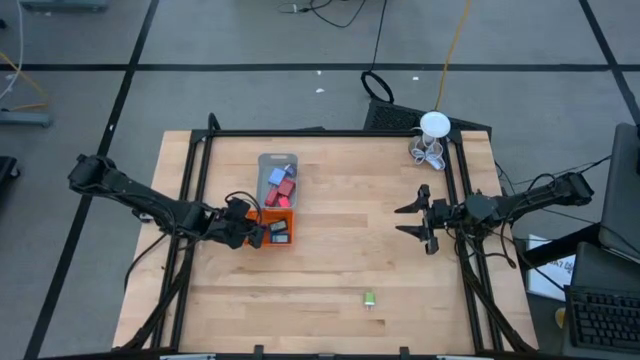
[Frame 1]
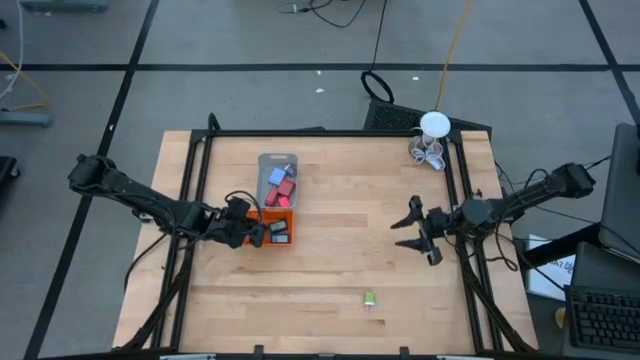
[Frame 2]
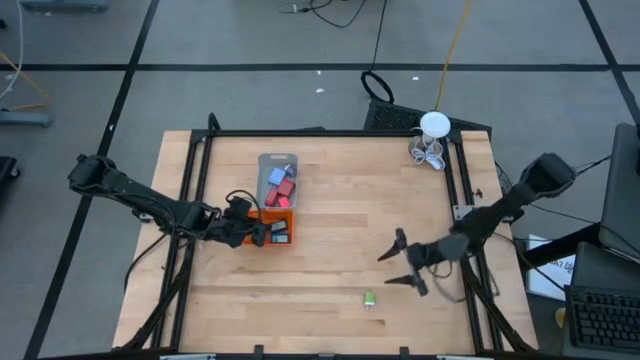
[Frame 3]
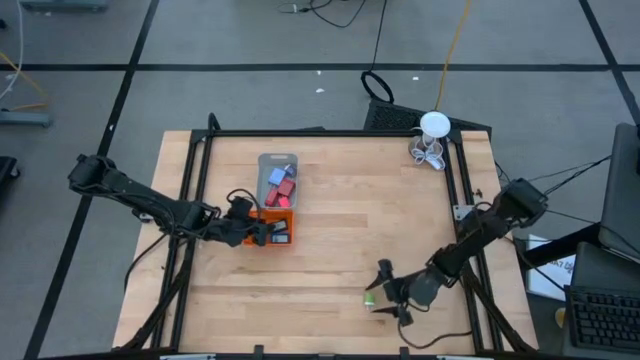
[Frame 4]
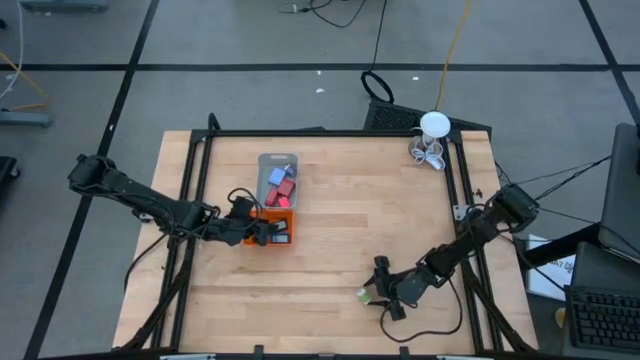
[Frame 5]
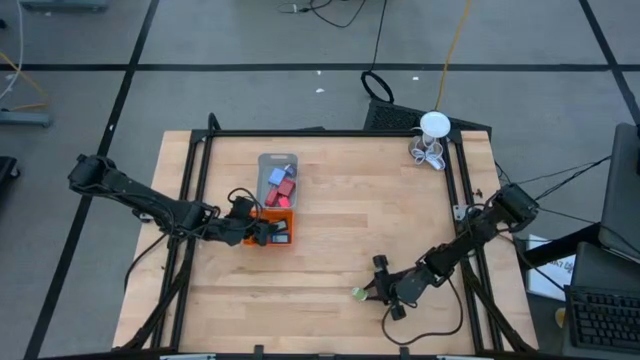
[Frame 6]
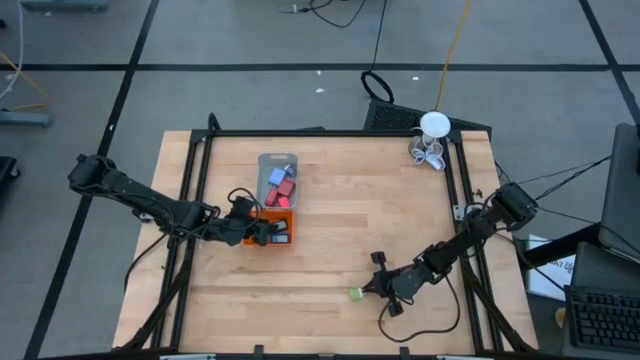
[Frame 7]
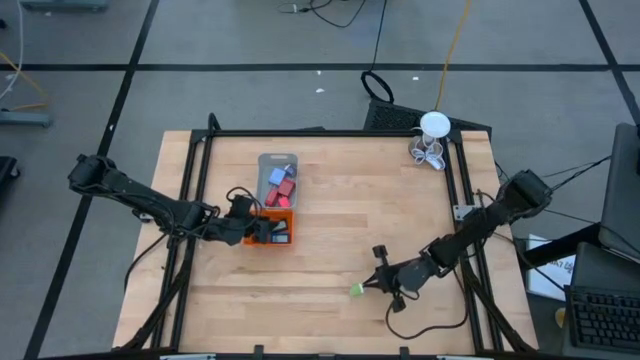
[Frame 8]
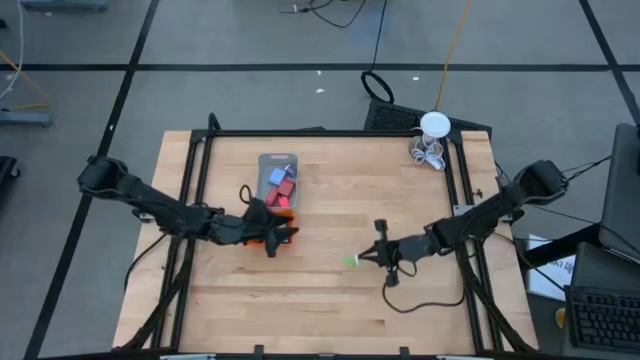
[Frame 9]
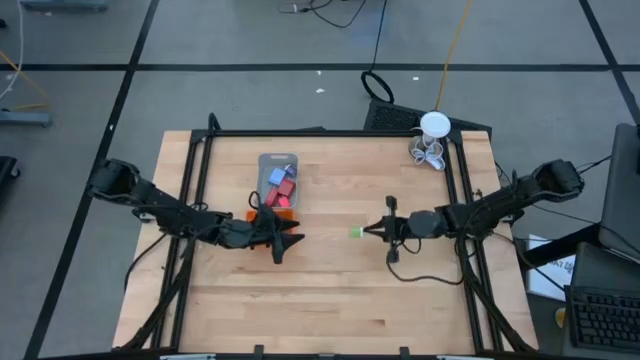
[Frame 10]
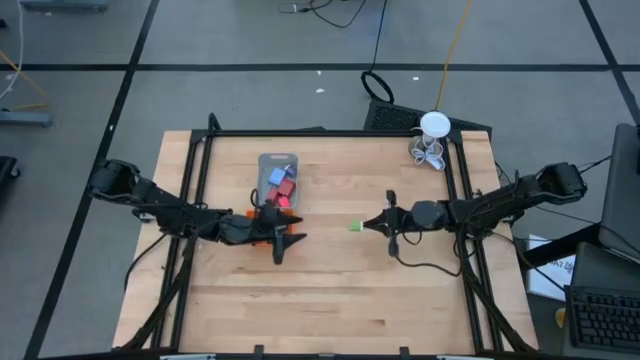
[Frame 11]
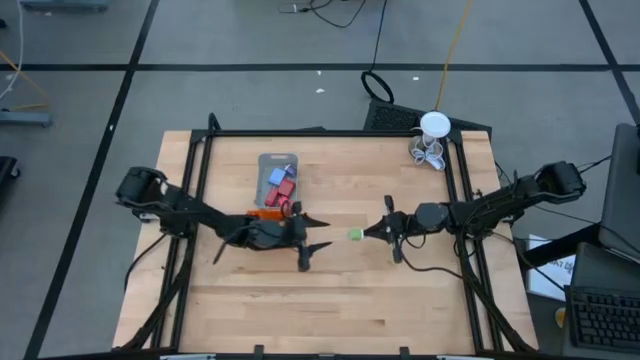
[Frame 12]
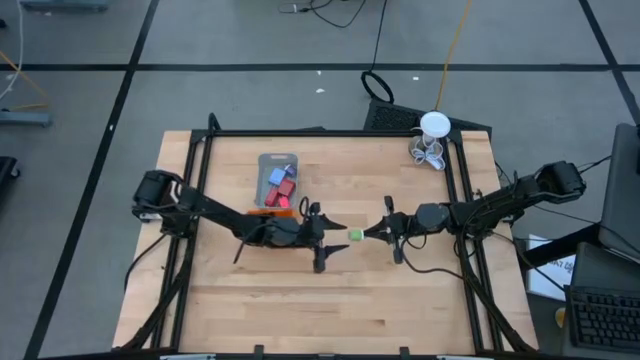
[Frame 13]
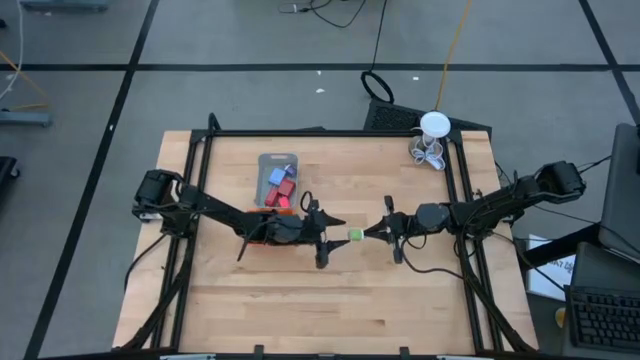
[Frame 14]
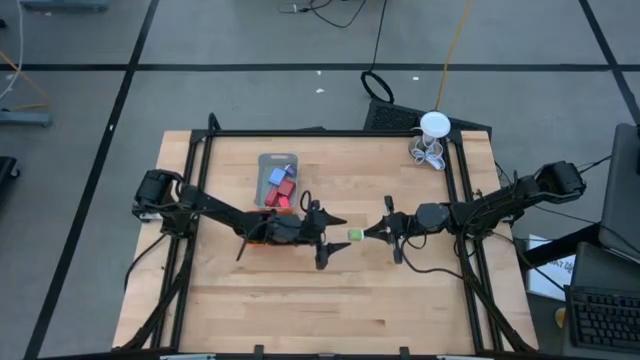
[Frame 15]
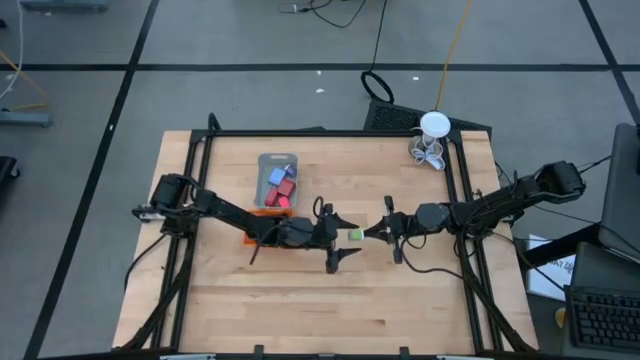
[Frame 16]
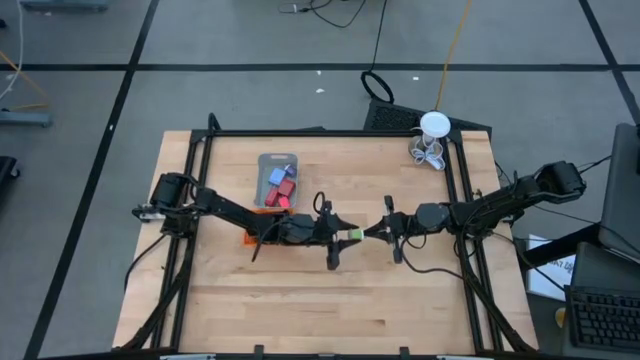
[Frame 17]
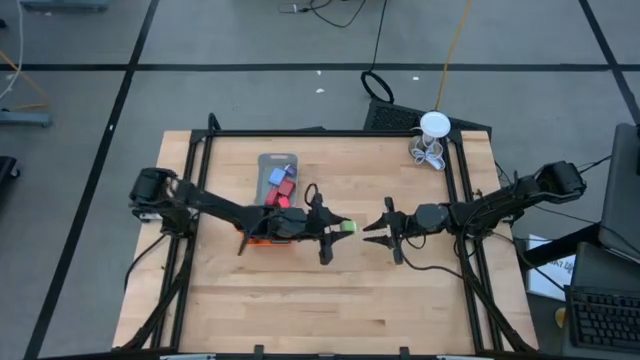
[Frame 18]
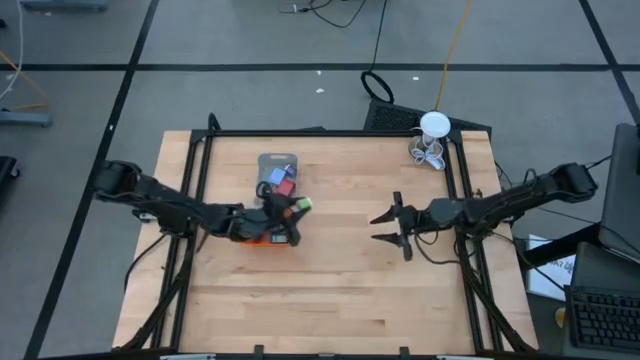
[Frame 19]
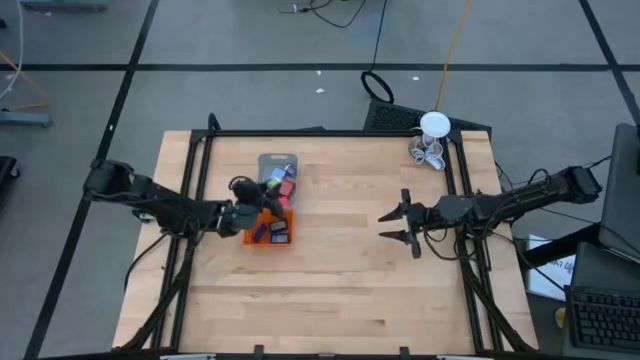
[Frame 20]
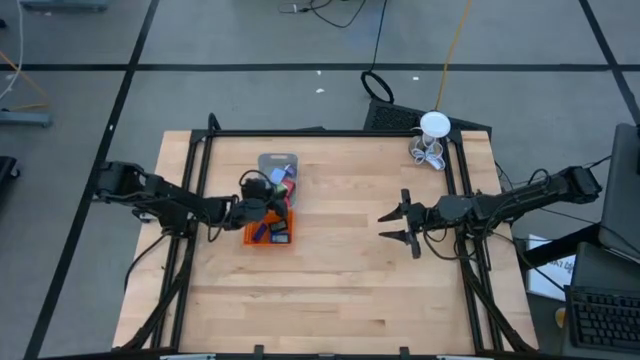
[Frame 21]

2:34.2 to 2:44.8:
Task: Pick & Place Office items
Put the green charger adapter into the gray bin

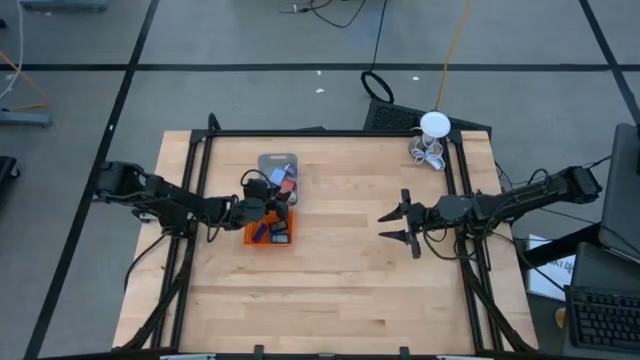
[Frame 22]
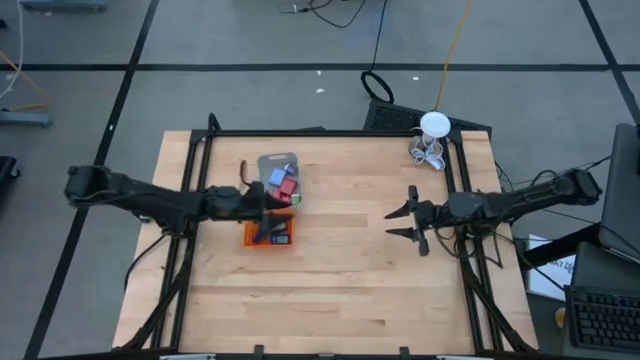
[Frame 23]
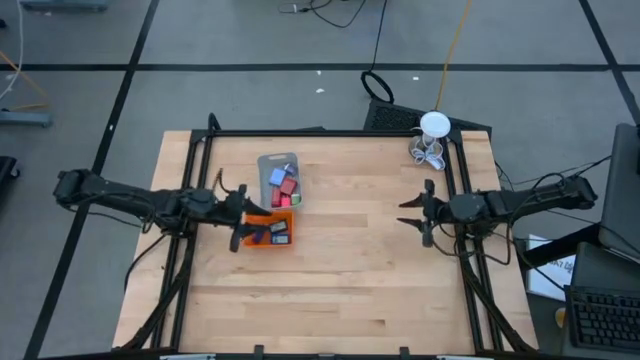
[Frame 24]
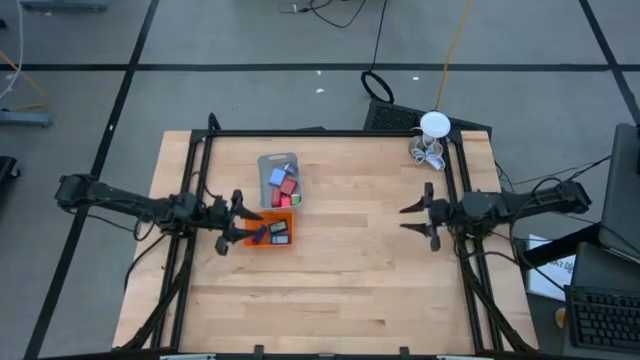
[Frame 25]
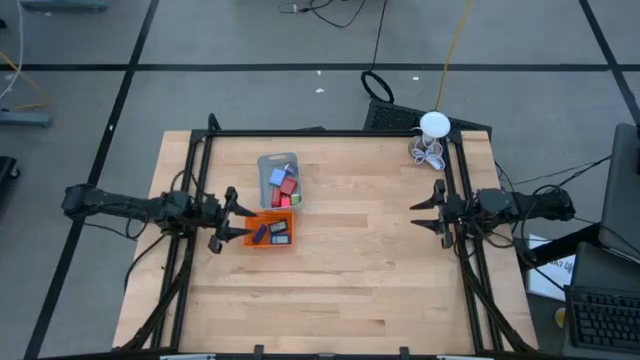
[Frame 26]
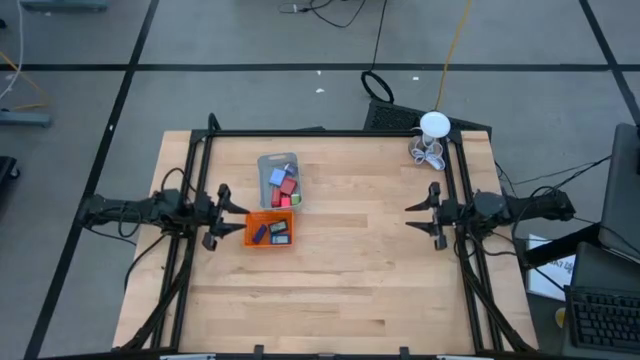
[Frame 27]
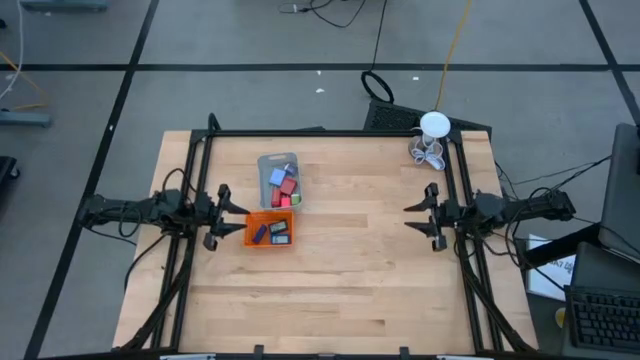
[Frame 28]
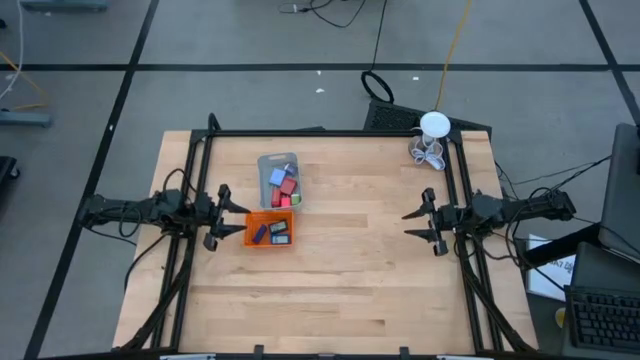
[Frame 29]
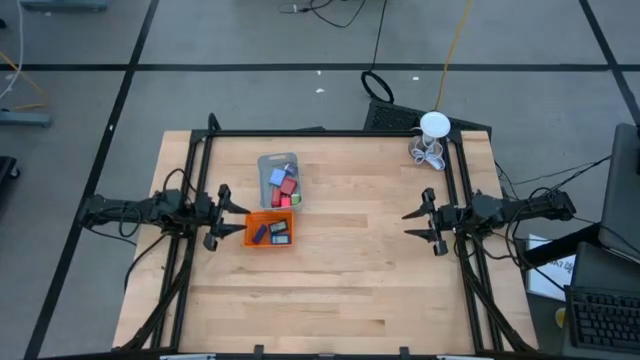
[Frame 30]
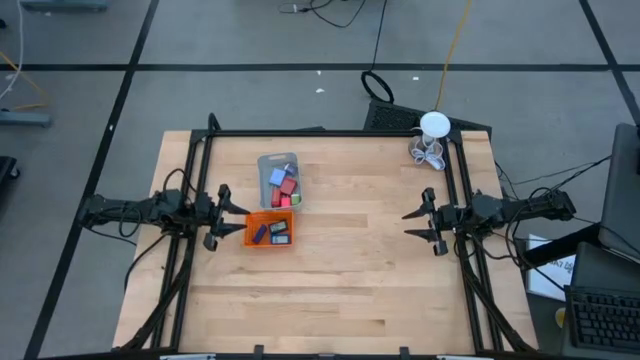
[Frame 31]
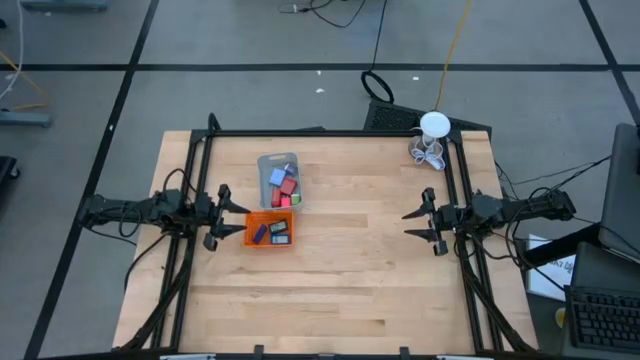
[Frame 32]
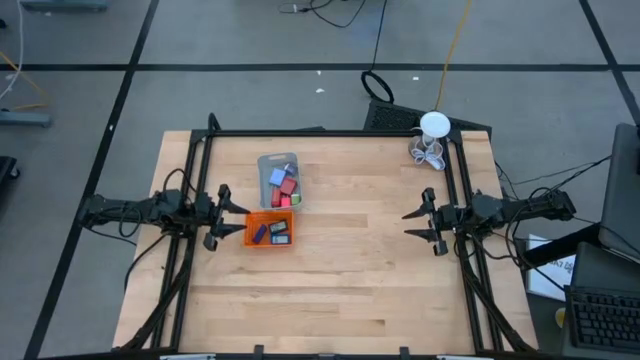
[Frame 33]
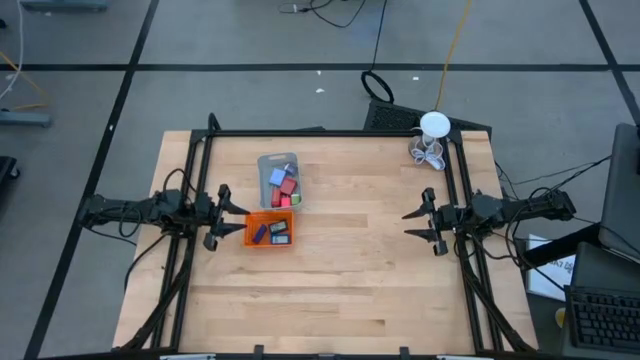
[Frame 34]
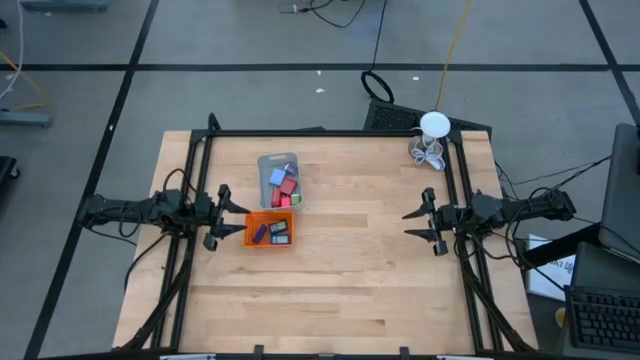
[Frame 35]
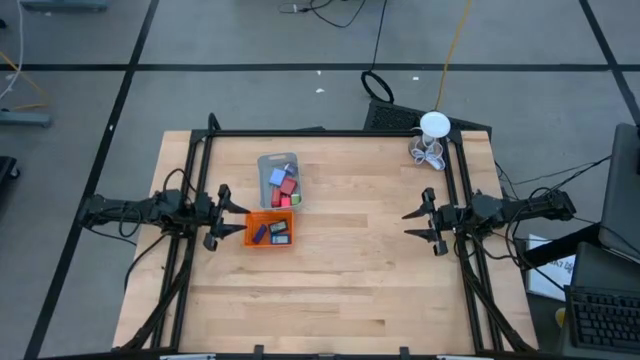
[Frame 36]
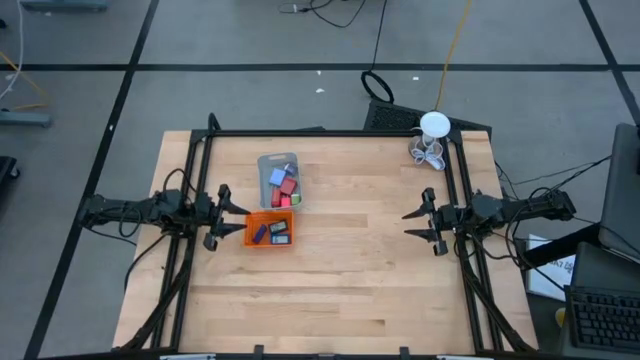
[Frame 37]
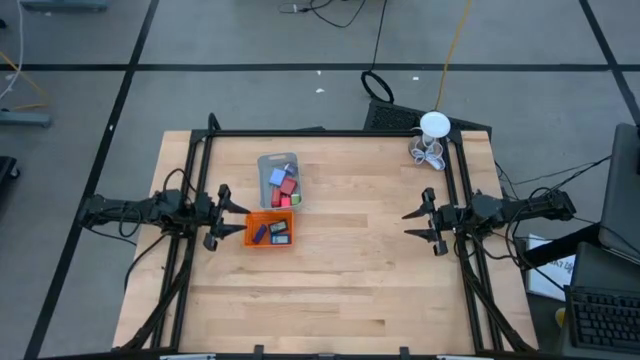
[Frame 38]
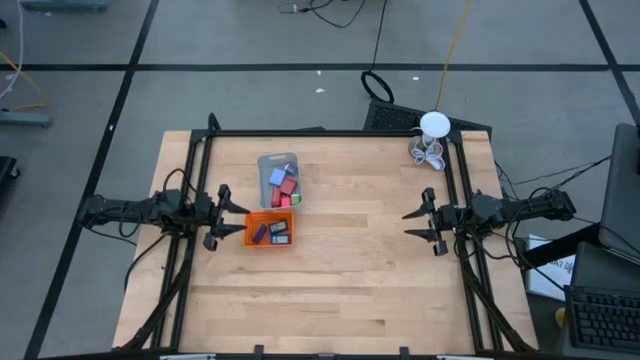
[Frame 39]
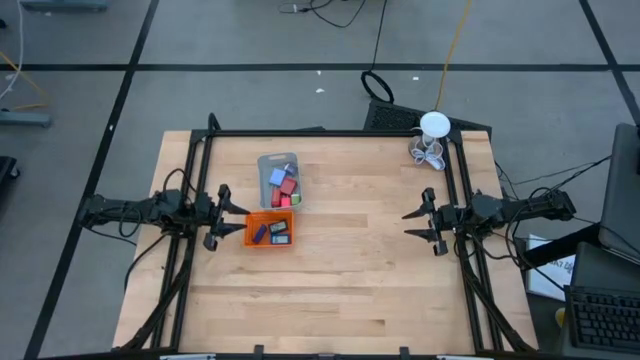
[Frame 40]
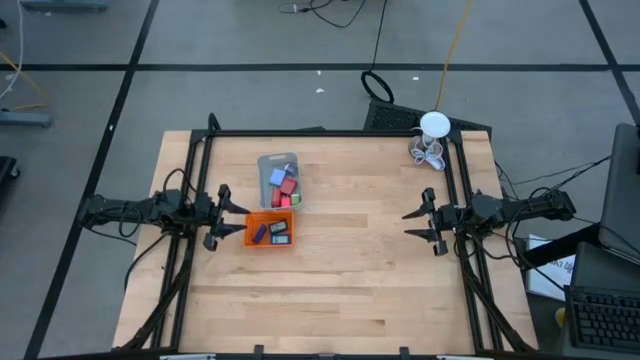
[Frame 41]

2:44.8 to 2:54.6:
Return to Home Position
